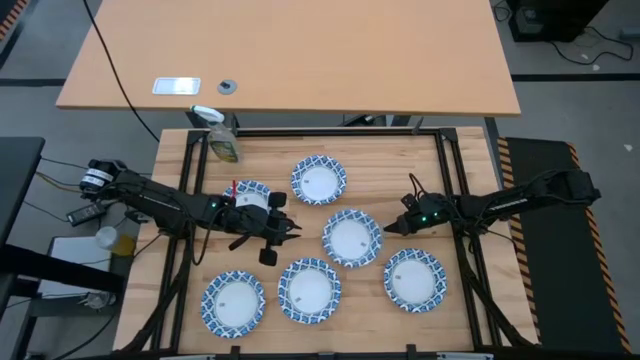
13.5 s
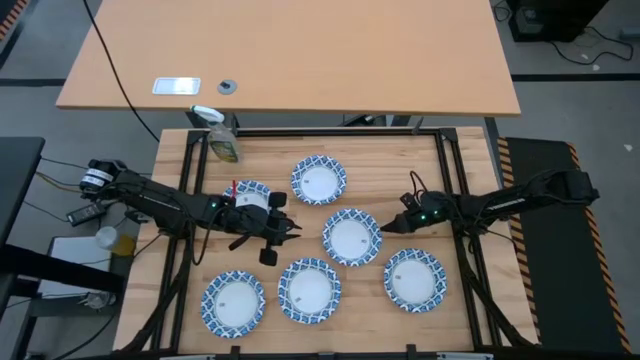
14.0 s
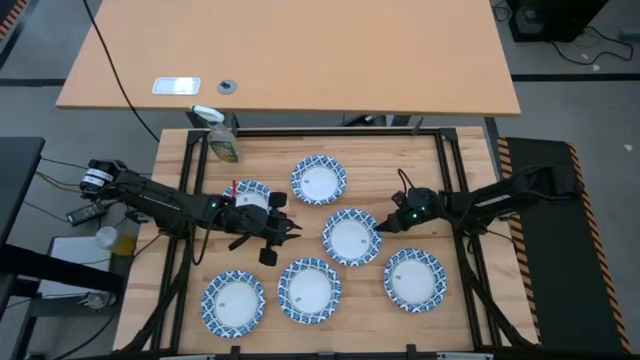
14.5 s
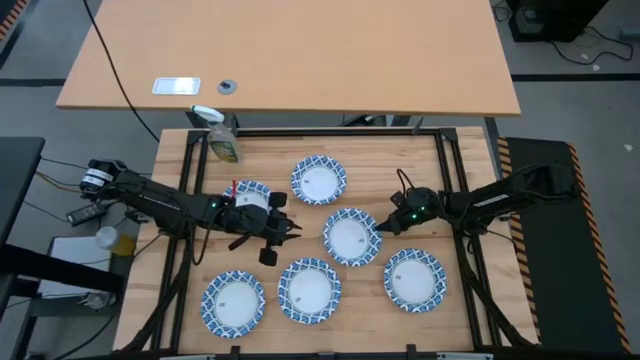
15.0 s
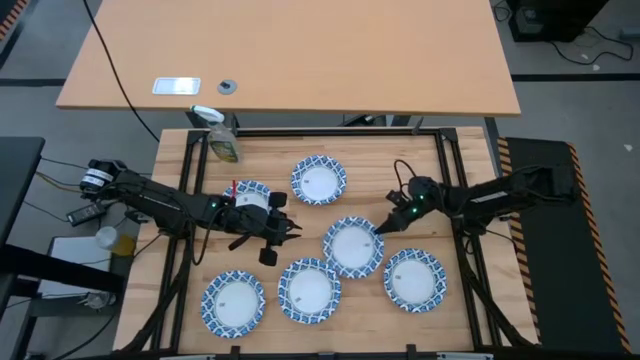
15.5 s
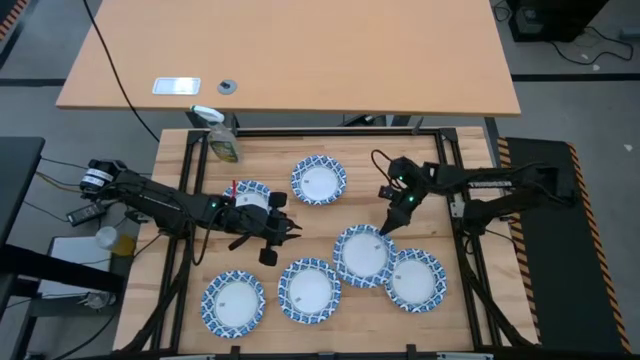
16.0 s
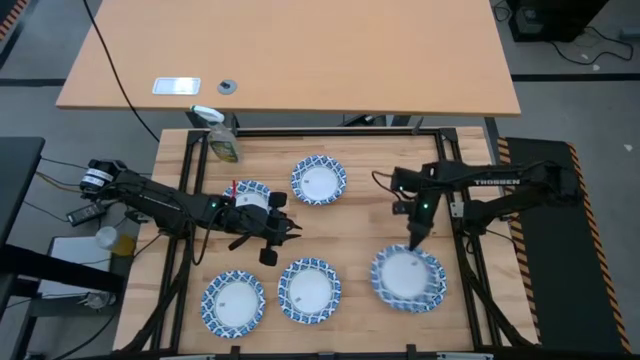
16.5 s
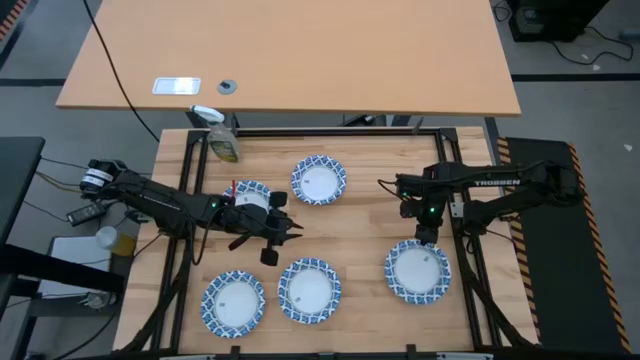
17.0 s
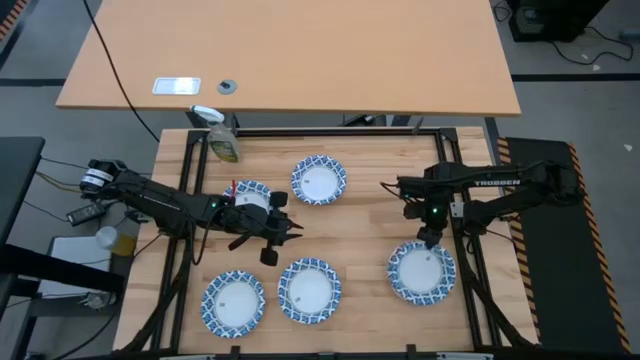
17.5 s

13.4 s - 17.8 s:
Stack the white bowl on top of the white bowl

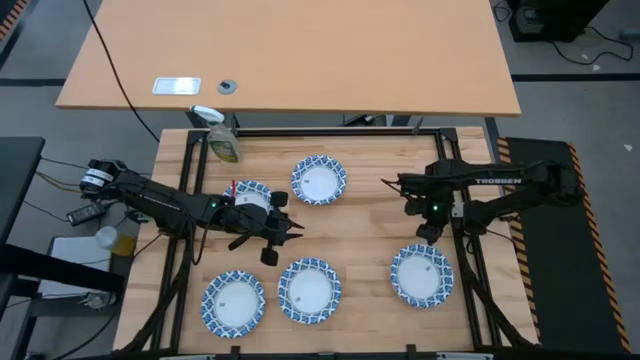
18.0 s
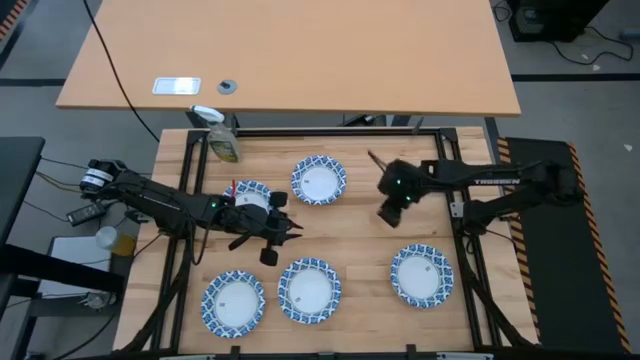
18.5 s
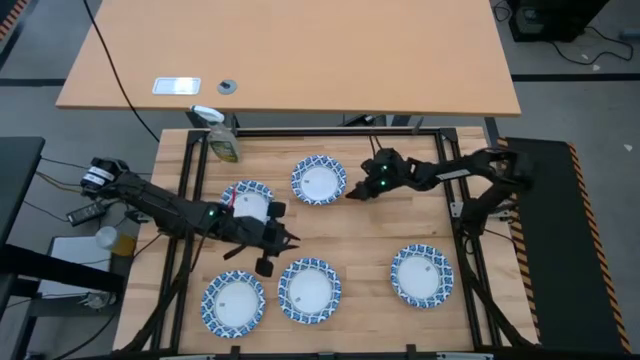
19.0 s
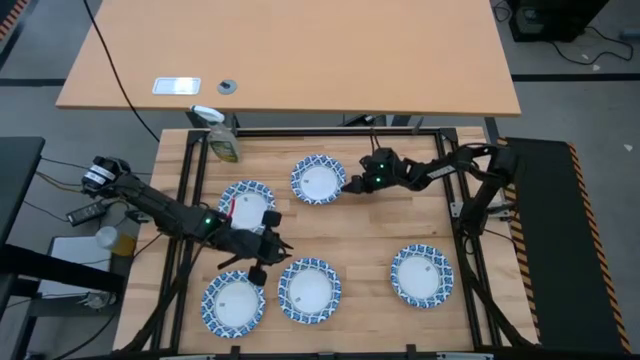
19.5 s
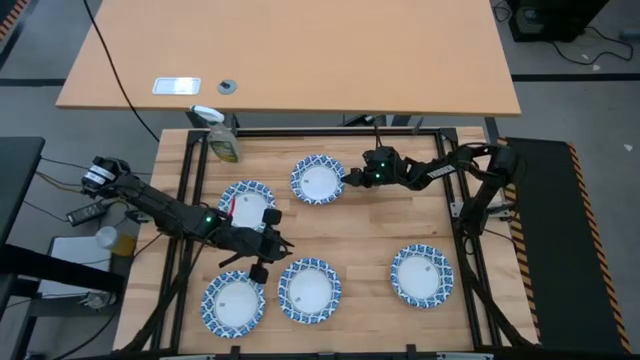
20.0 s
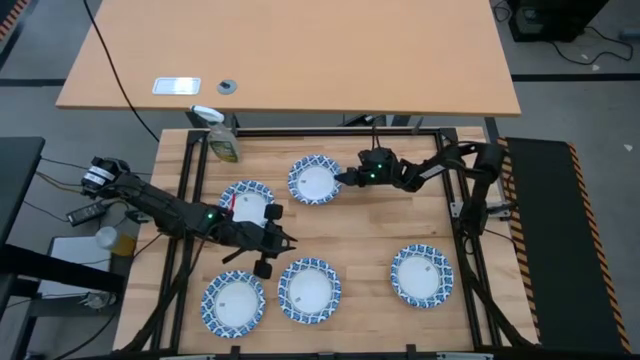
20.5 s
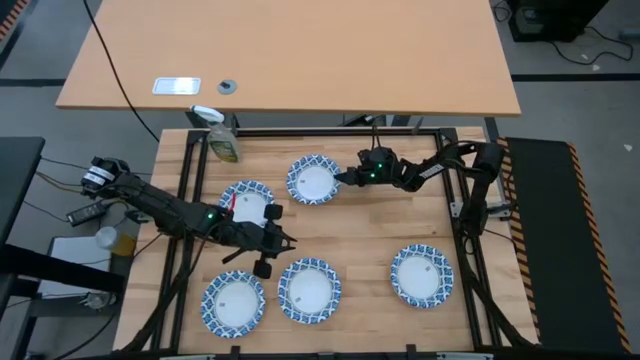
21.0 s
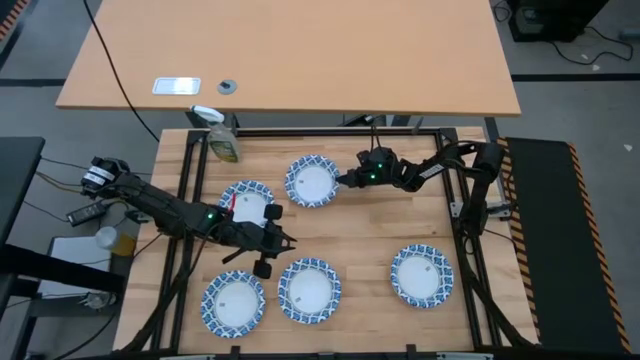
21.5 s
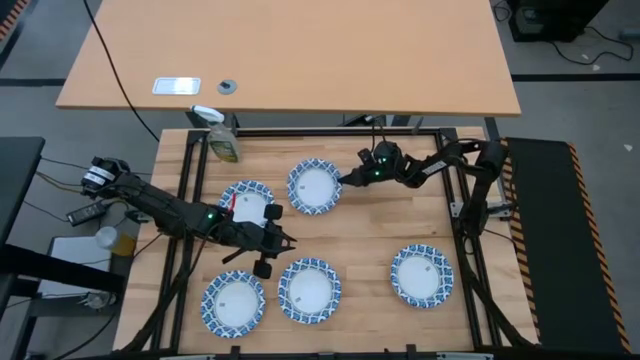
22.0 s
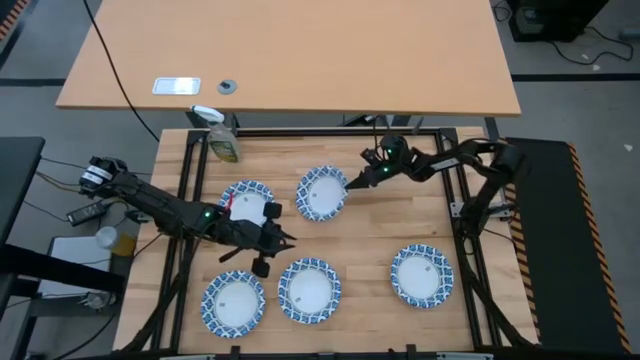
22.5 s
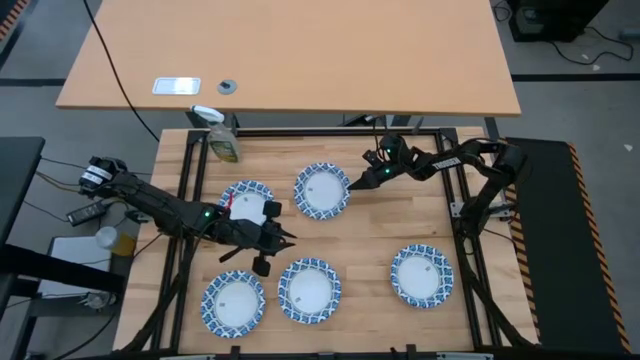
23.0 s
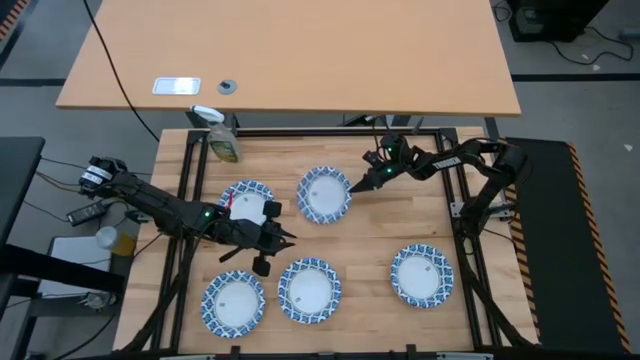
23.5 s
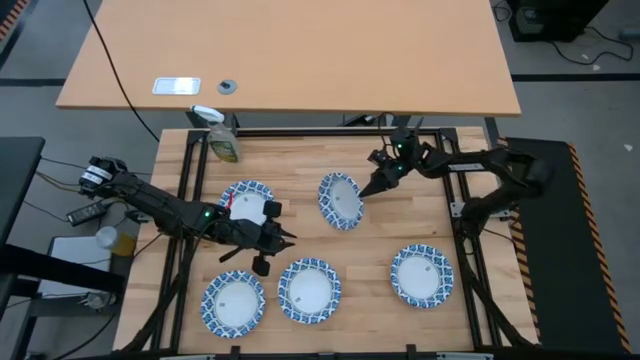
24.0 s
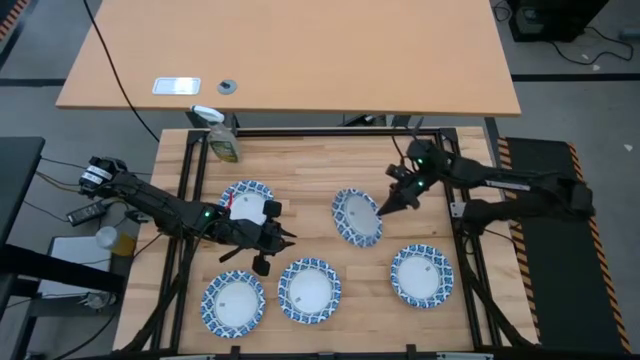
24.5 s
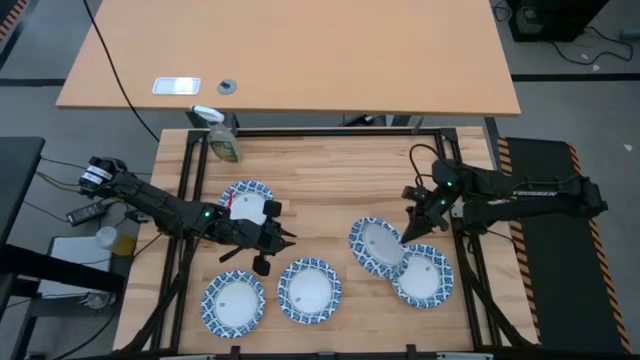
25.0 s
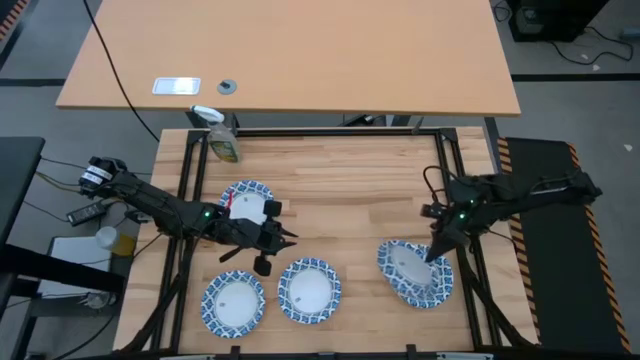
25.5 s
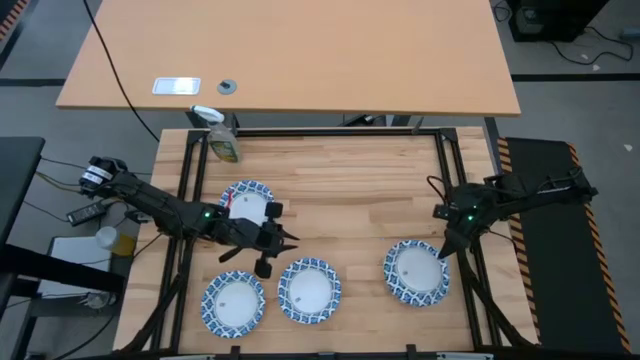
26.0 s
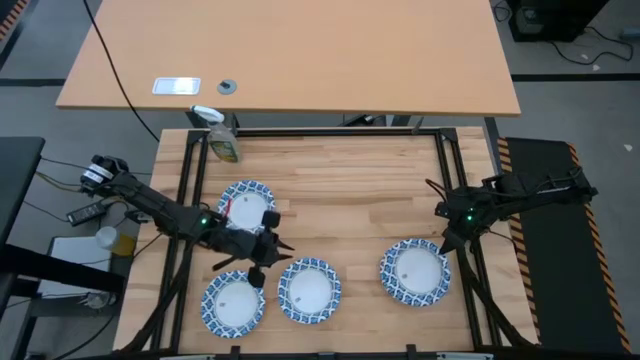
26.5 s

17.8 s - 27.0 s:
Stack the white bowl on top of the stacked white bowl
